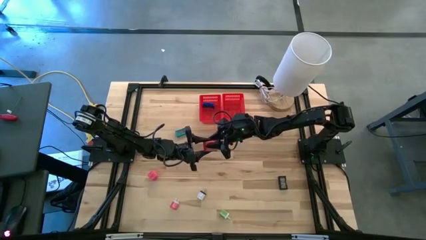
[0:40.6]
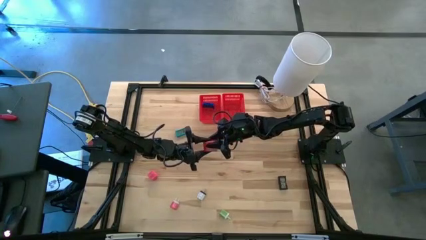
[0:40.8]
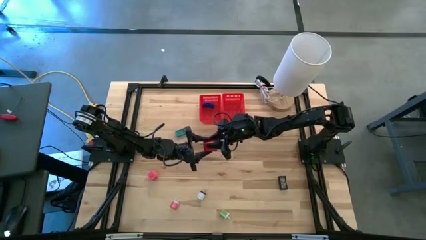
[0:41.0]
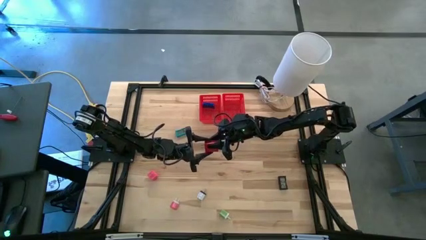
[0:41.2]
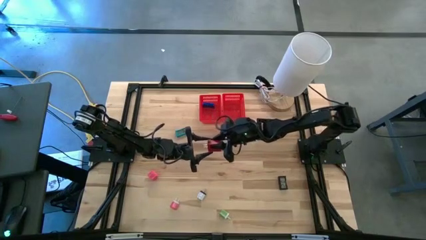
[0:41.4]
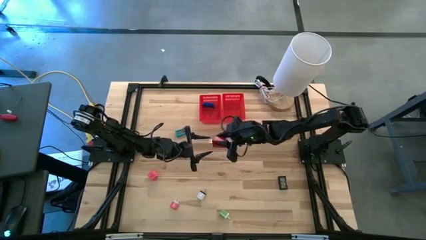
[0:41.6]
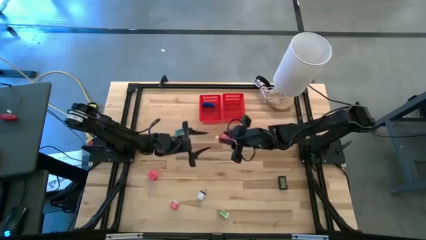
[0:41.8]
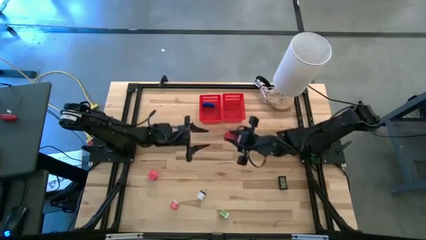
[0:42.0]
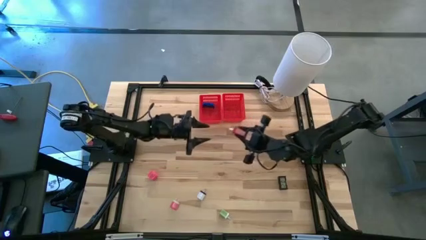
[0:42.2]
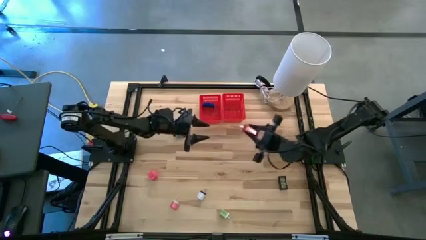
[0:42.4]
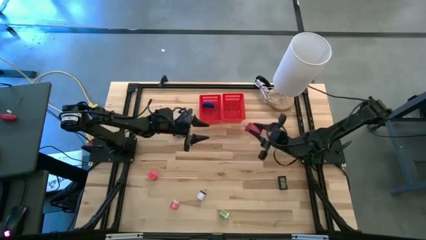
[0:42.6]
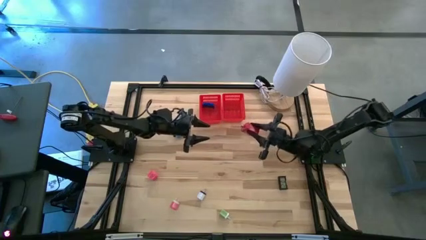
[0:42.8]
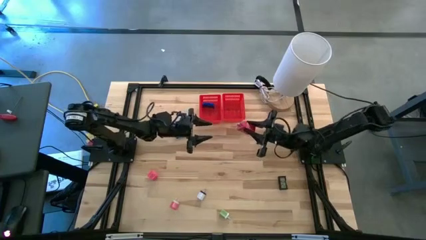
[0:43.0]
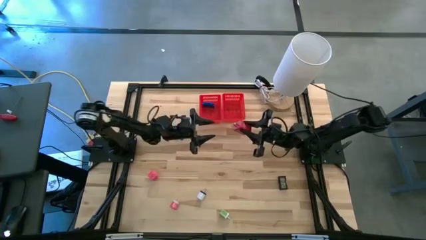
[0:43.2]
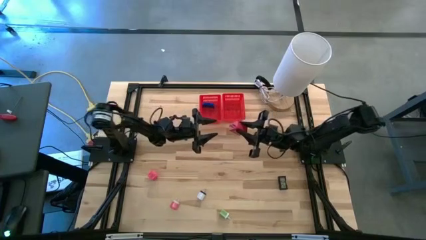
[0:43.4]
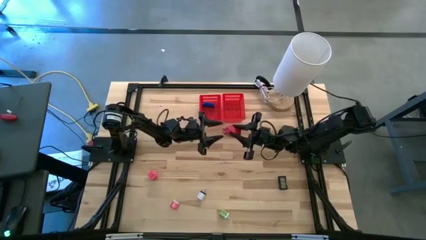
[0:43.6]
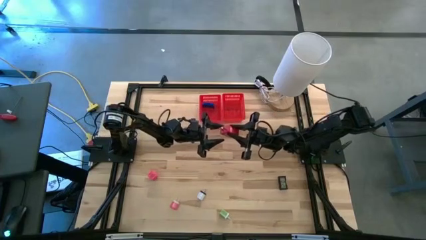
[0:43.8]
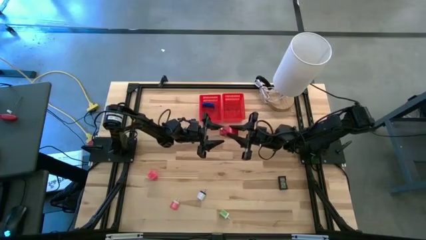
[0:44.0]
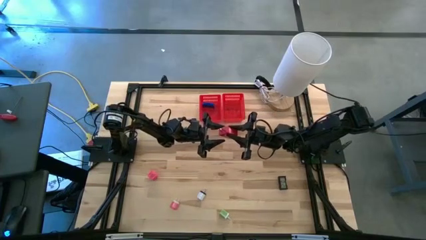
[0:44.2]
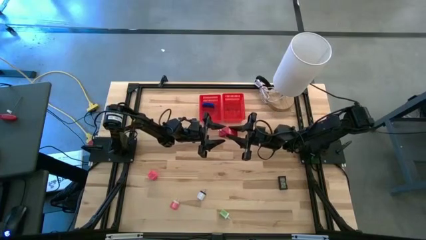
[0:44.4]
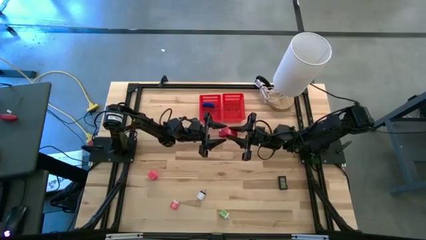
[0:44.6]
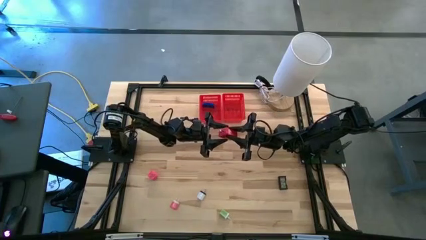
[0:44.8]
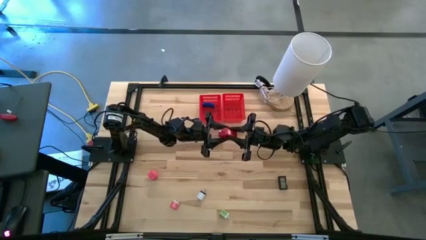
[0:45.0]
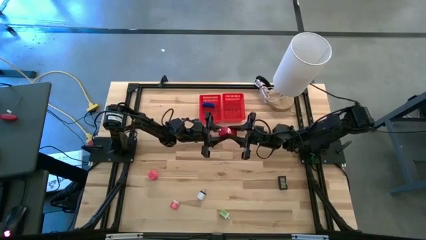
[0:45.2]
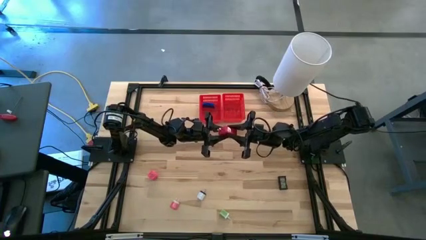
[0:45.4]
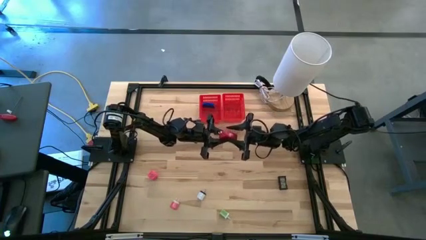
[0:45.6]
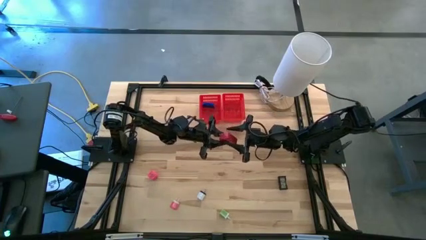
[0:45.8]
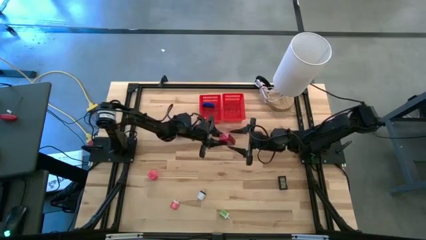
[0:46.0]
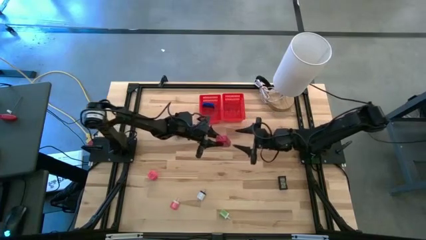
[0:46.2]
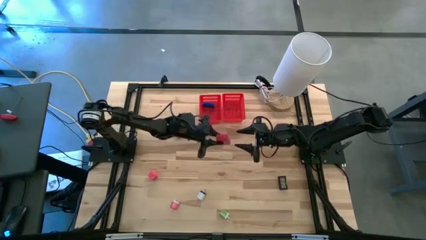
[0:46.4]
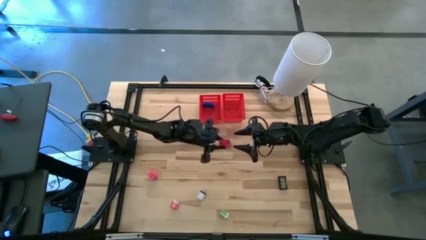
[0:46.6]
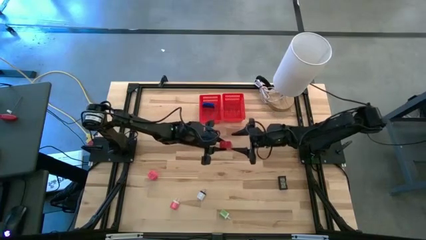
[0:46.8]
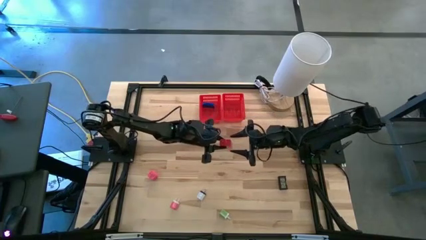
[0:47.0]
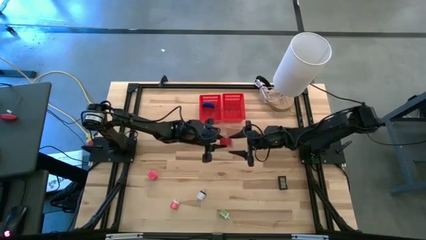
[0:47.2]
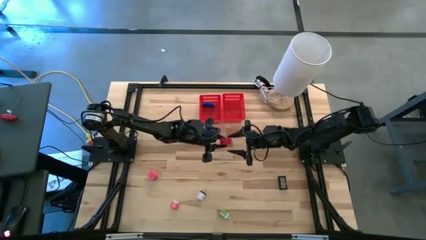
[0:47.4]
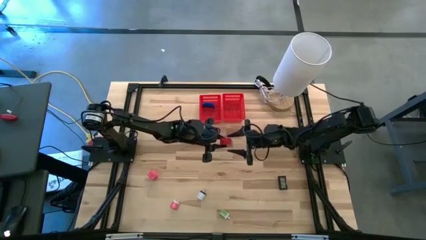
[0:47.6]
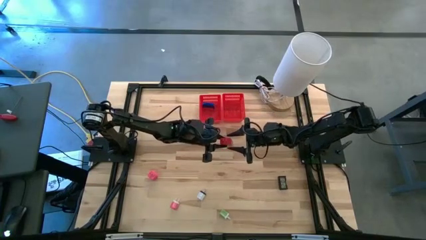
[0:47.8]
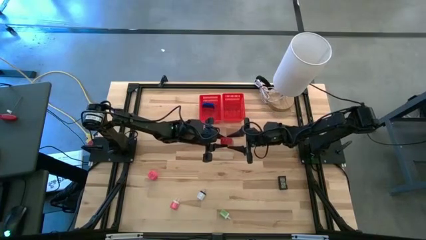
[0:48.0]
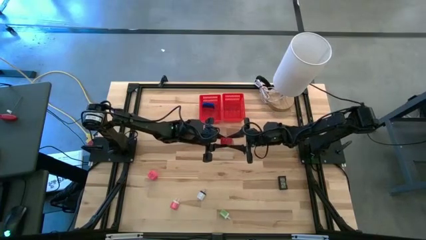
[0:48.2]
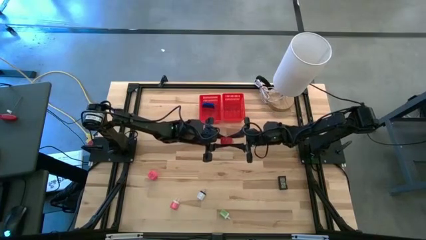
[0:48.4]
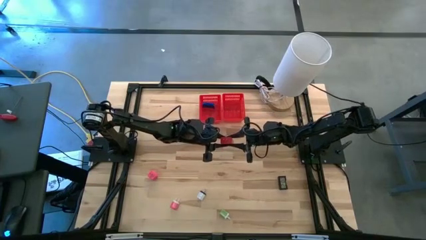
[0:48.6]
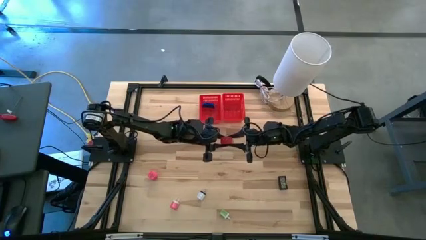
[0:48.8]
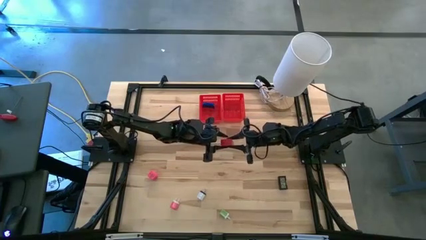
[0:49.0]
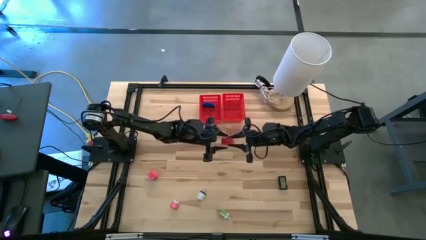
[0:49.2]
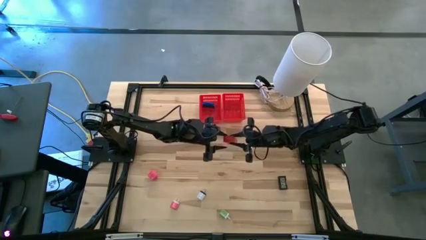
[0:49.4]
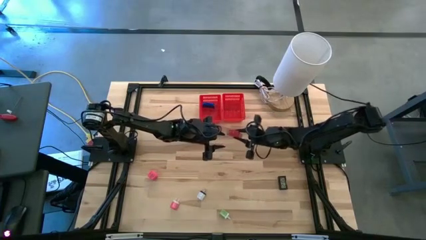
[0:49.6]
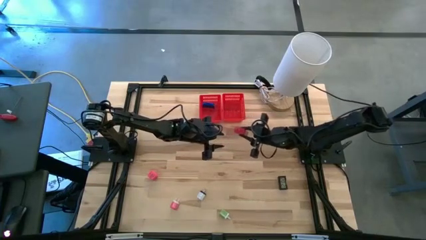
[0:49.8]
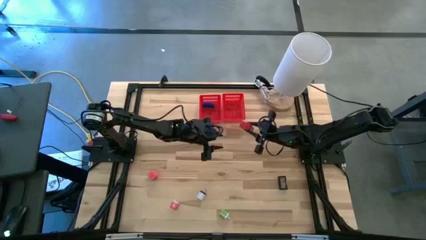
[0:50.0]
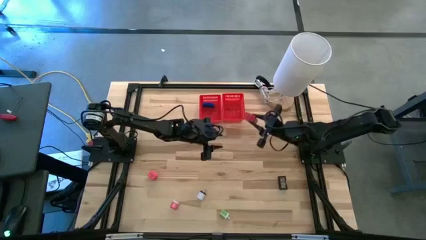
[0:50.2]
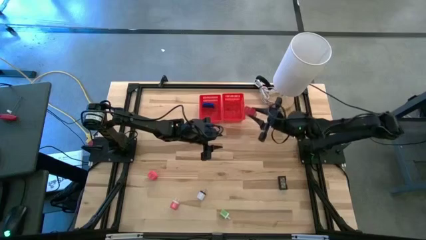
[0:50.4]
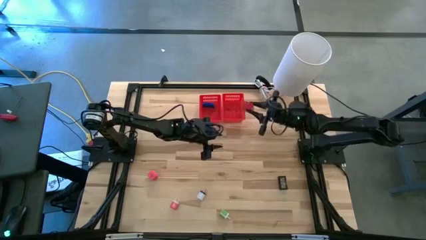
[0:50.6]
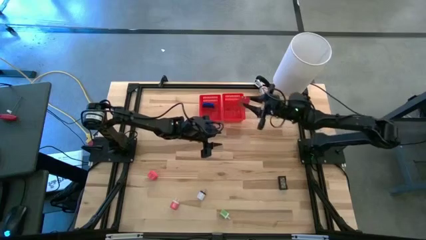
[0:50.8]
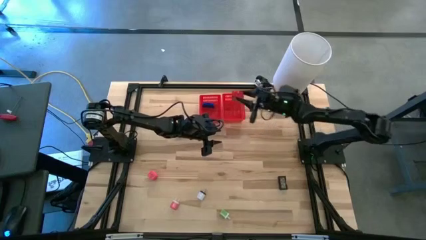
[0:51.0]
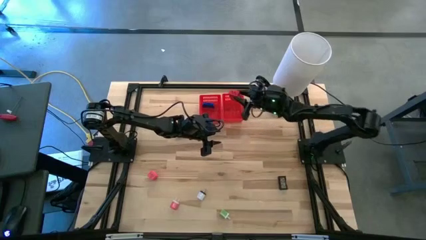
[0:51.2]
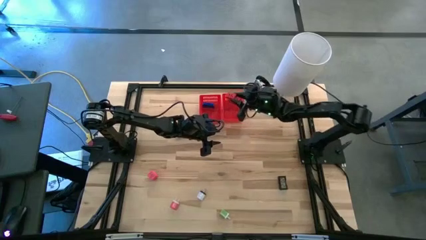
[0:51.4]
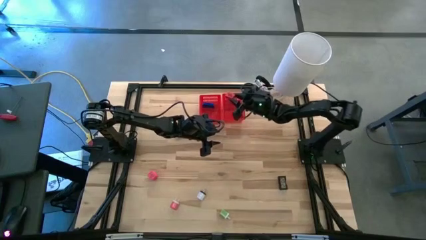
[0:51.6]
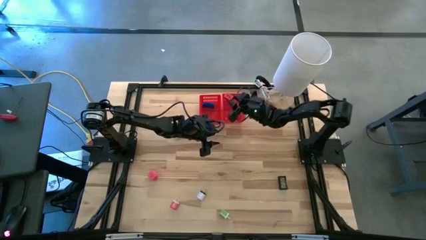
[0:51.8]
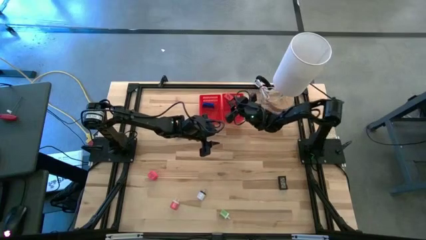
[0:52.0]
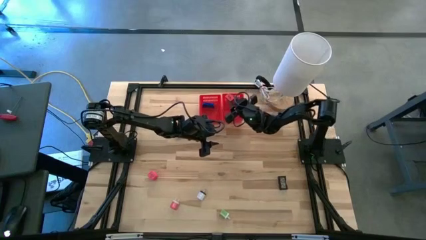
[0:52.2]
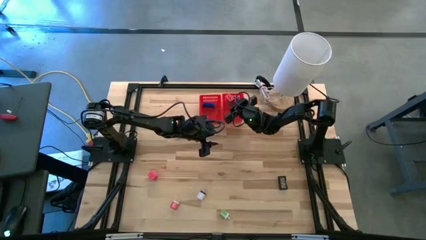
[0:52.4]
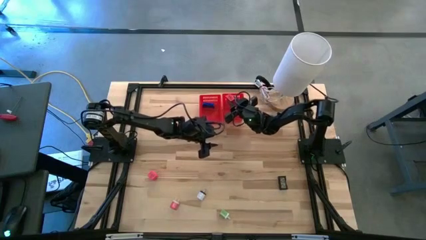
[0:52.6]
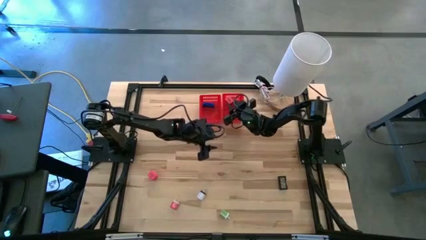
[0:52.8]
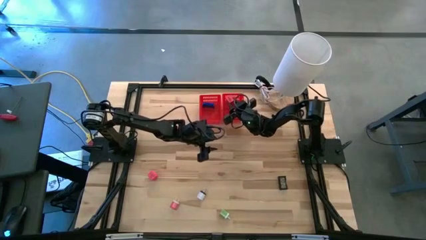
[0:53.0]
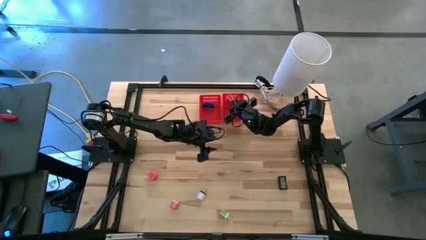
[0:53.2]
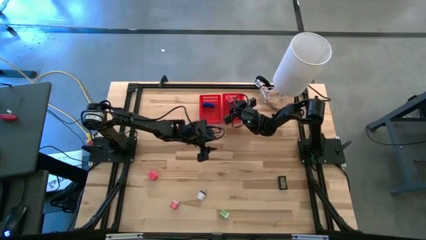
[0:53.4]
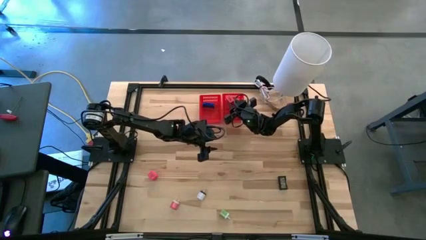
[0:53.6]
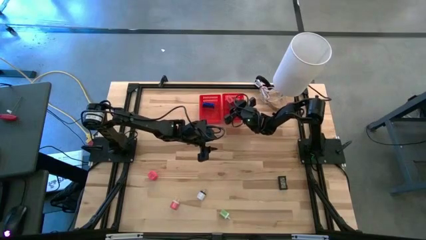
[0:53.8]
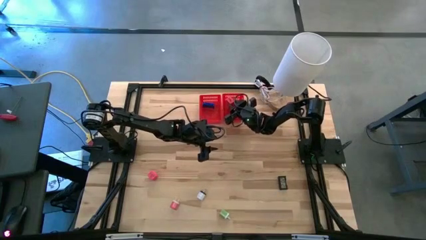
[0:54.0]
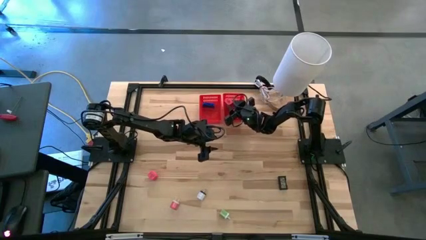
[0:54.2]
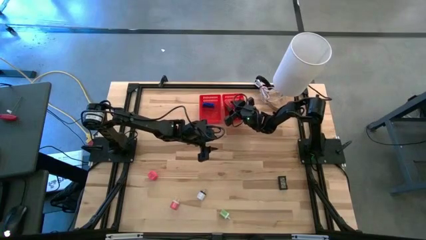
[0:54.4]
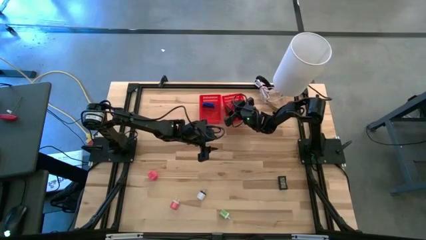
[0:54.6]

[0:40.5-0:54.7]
Task: Pick & Place Office items
Put the red charger adapter into the right red bin
